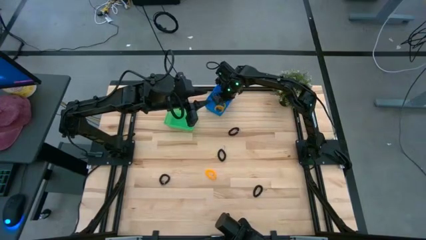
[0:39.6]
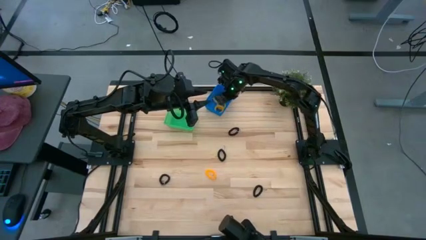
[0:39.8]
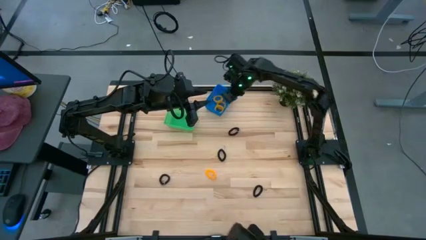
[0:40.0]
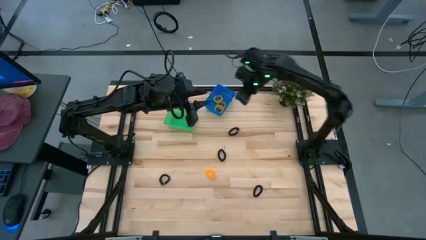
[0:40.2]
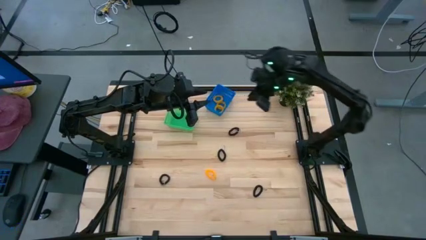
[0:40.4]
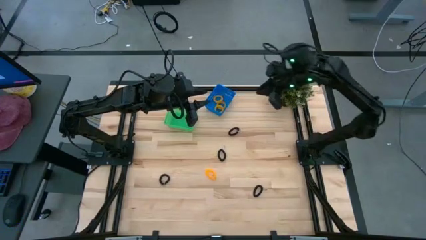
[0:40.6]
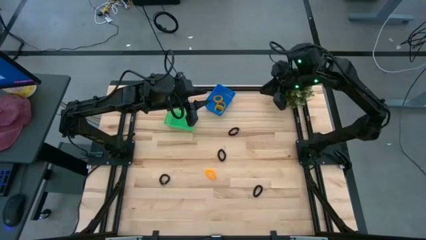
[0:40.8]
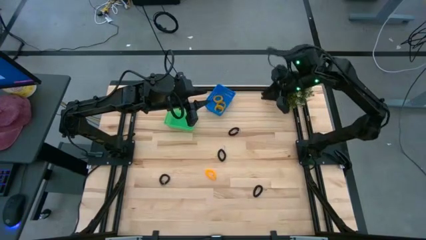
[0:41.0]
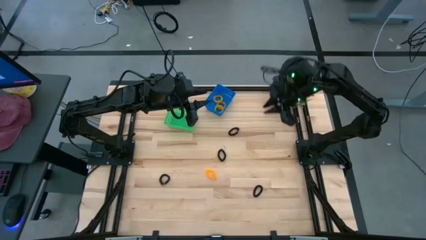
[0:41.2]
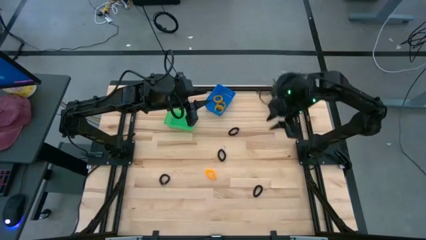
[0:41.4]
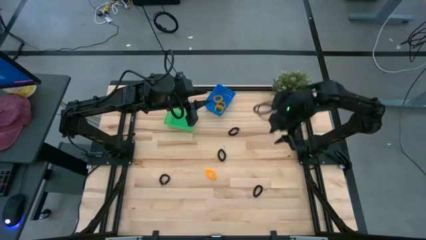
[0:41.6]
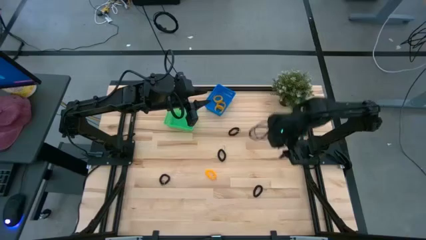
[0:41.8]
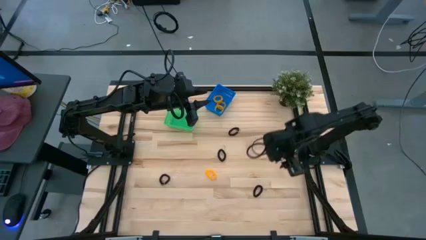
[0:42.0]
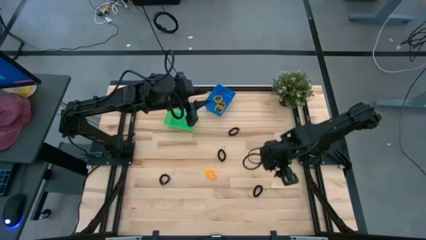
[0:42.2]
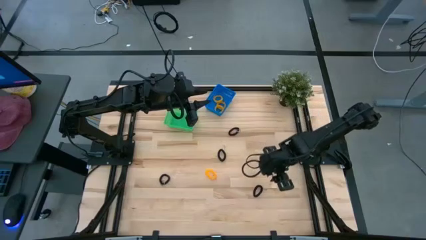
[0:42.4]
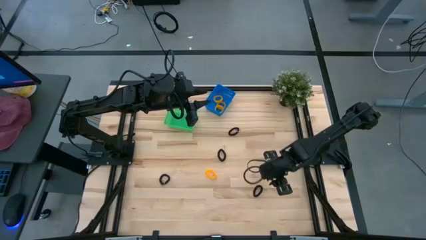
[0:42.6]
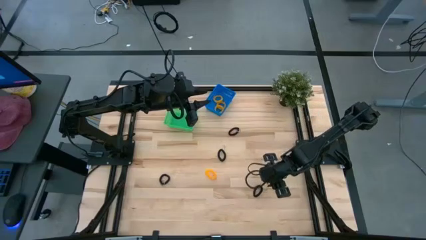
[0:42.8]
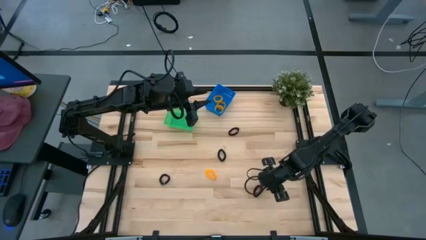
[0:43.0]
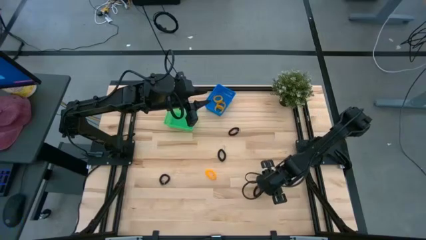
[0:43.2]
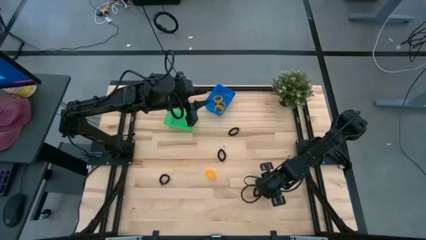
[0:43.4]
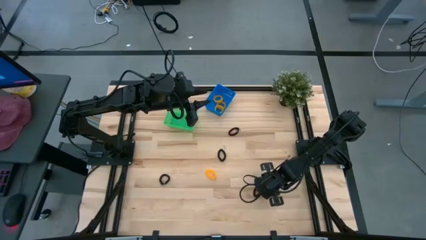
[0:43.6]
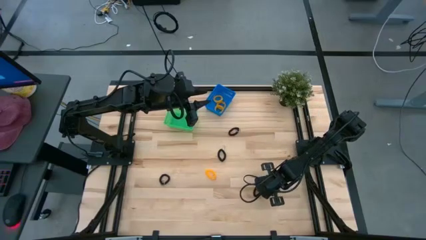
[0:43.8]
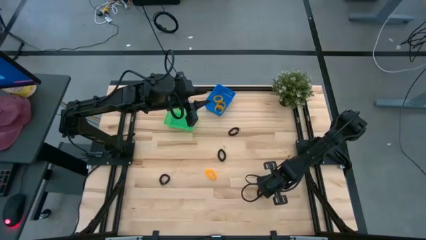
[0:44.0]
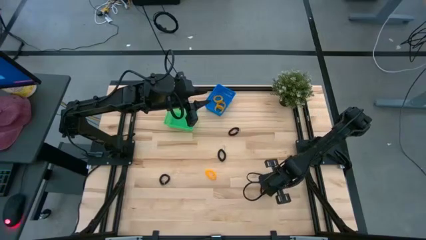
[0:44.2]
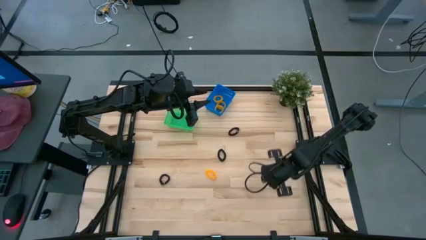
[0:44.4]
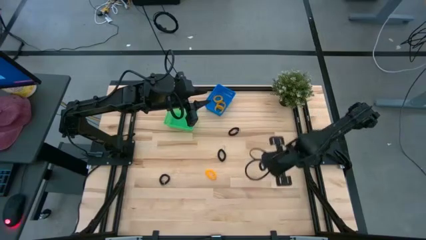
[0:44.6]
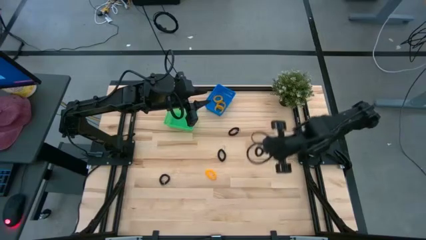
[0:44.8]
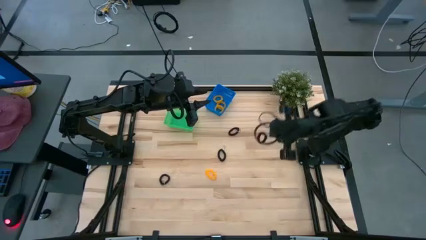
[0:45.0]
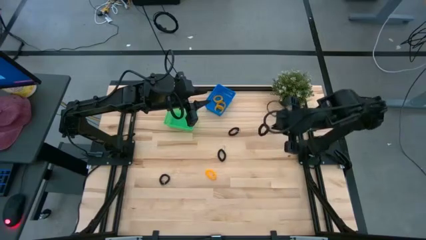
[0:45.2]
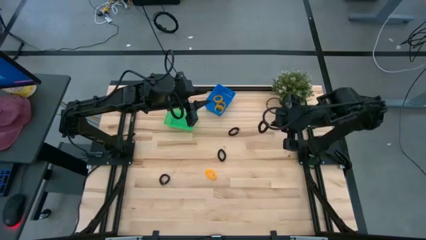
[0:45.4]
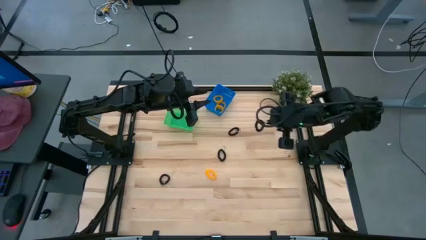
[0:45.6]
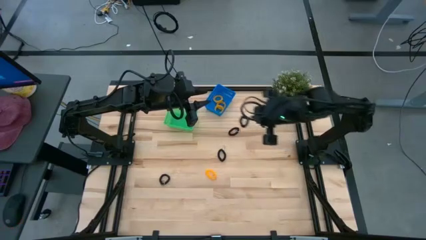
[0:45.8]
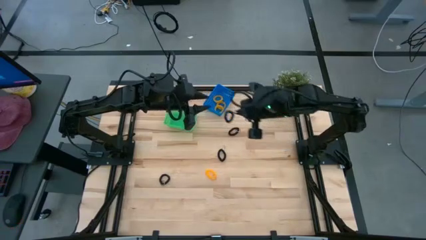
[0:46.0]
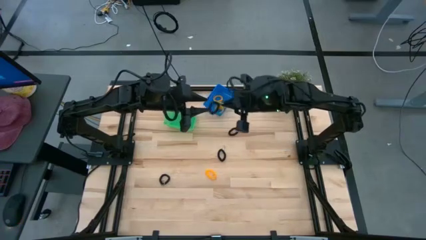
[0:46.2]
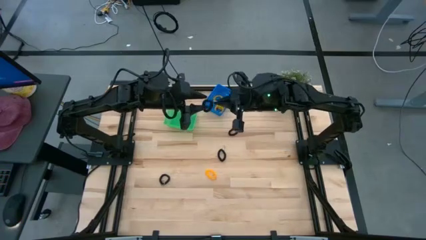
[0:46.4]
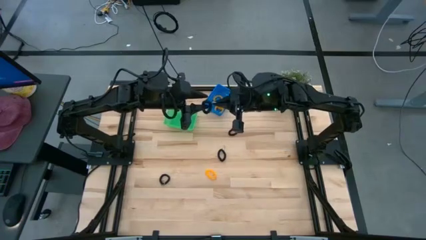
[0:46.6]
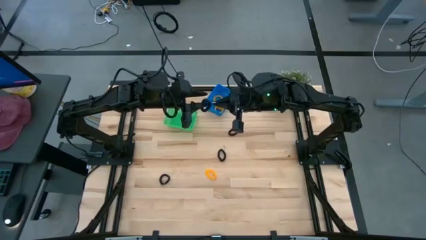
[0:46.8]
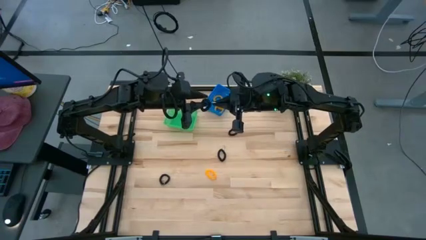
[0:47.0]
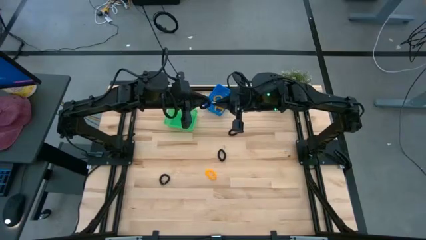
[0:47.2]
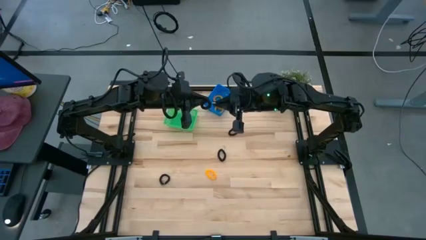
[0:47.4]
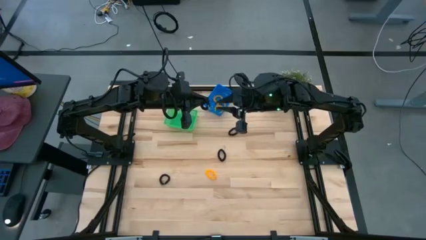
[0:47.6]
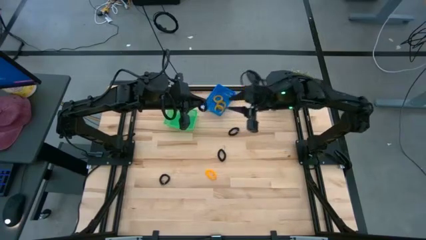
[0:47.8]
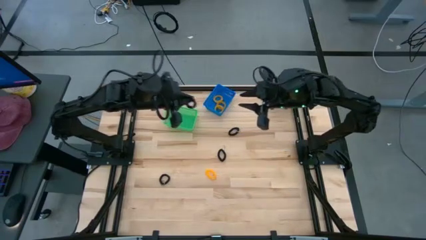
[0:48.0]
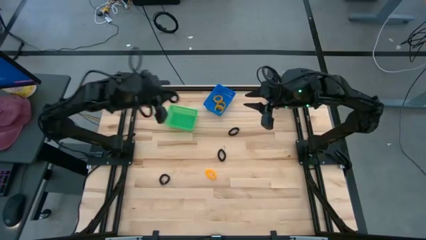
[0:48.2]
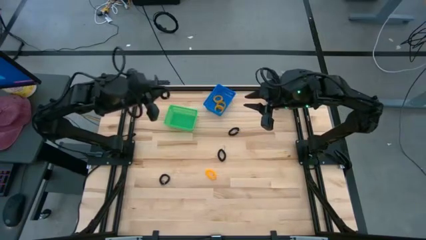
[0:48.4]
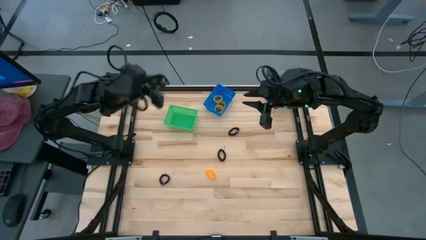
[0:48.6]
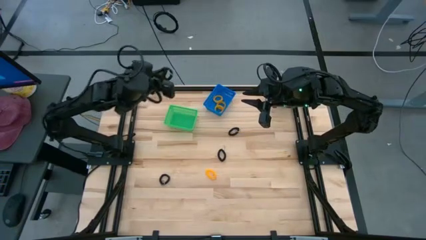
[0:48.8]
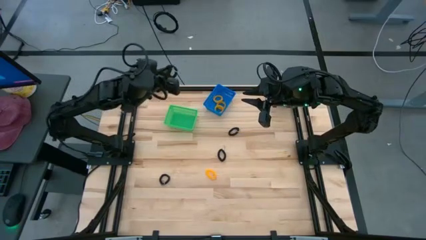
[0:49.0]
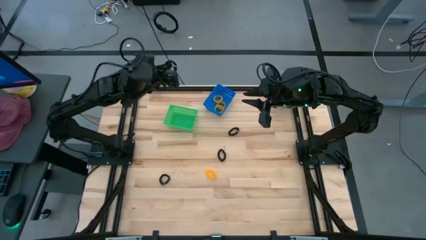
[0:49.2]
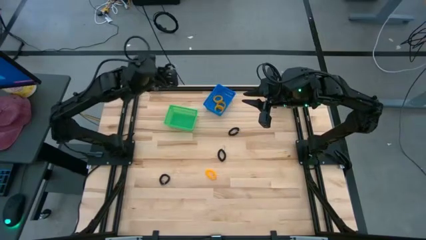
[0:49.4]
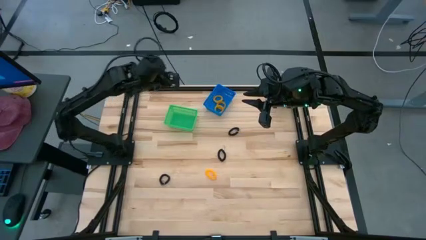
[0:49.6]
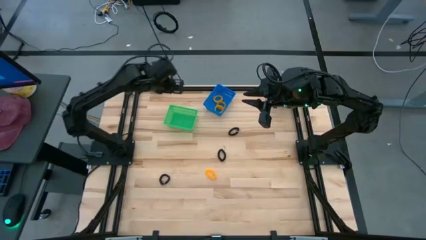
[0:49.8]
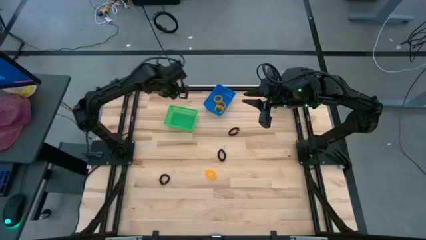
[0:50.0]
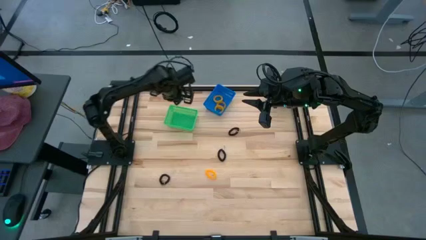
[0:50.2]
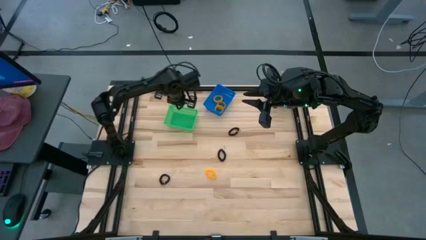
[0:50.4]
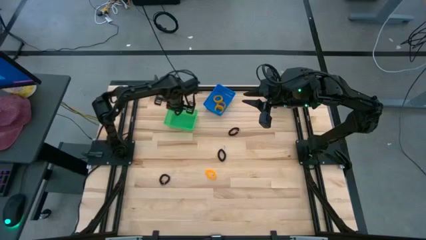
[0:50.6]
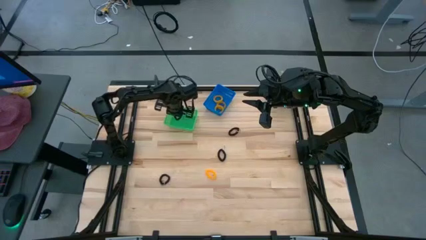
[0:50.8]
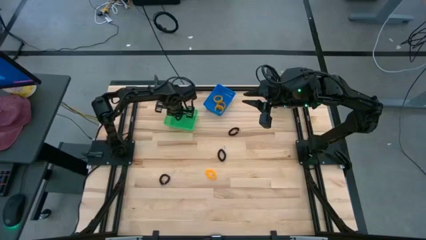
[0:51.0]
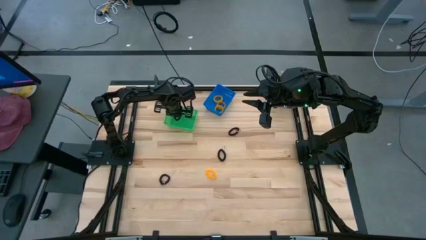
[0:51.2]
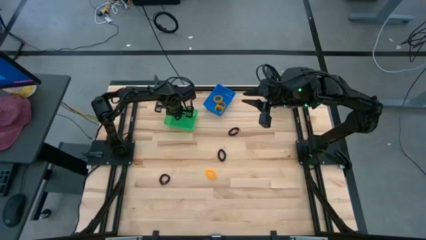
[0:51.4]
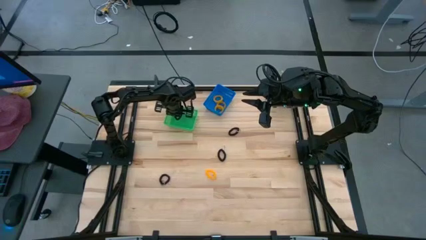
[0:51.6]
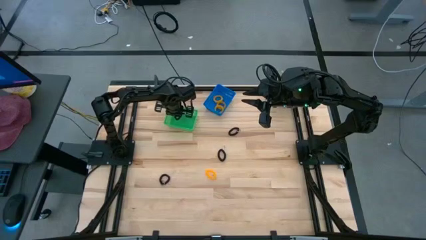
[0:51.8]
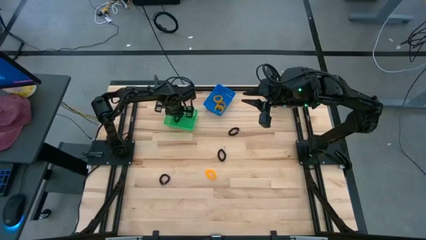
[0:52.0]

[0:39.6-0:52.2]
Task: Sort spring keychains into baskets
Put the black spring keychain into the green basket
